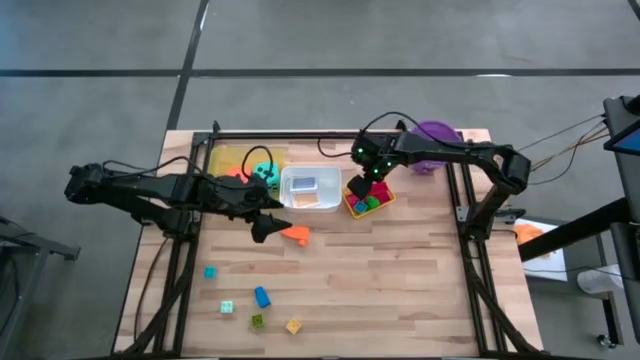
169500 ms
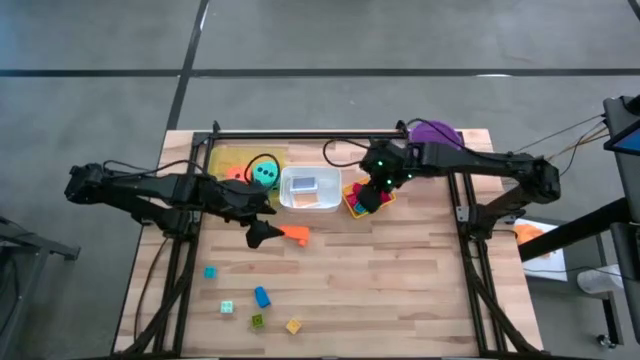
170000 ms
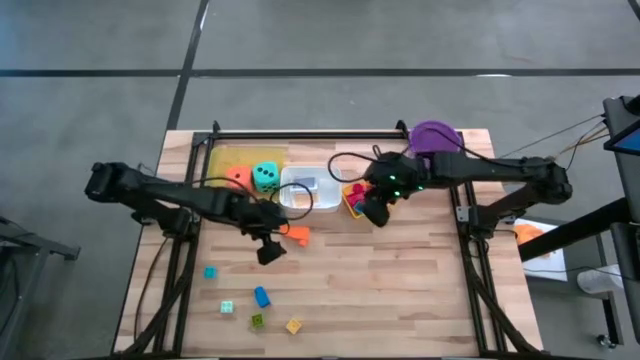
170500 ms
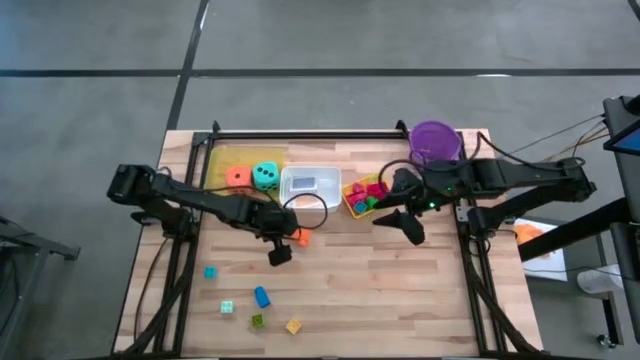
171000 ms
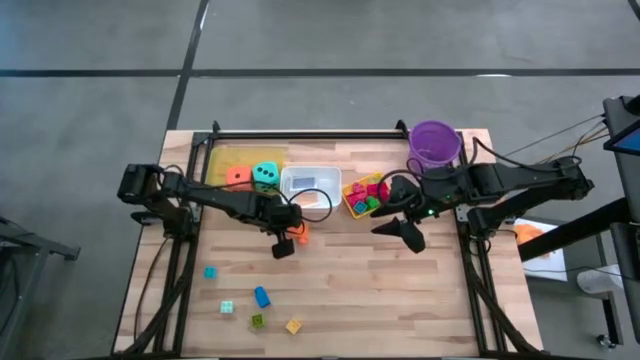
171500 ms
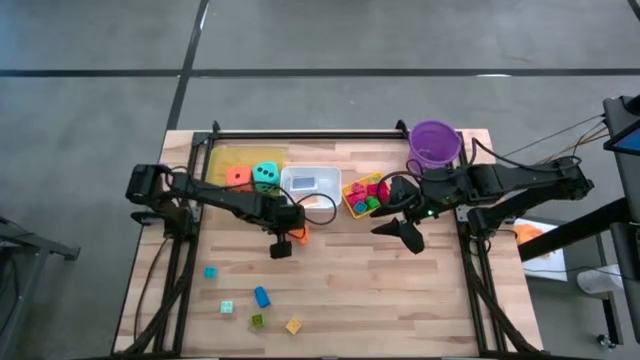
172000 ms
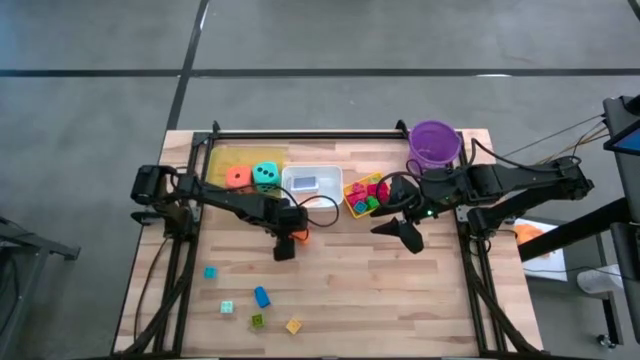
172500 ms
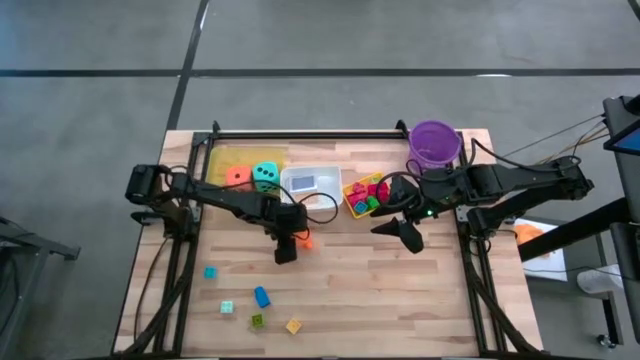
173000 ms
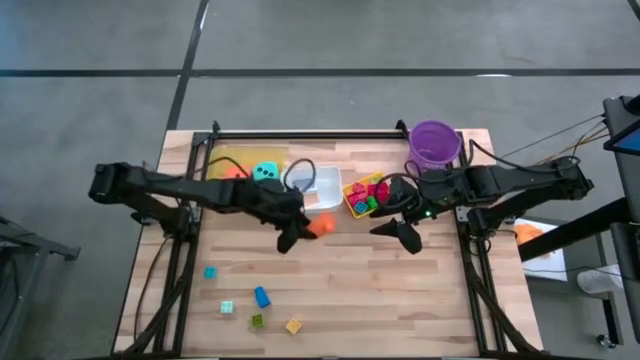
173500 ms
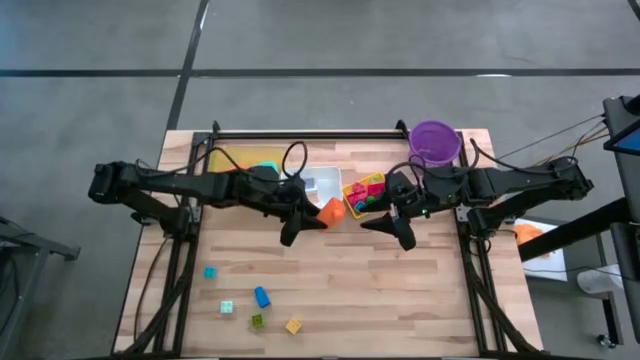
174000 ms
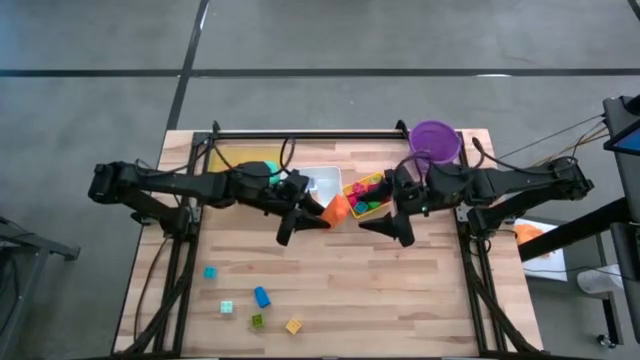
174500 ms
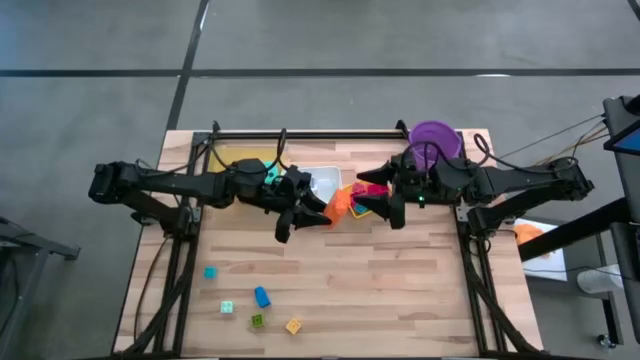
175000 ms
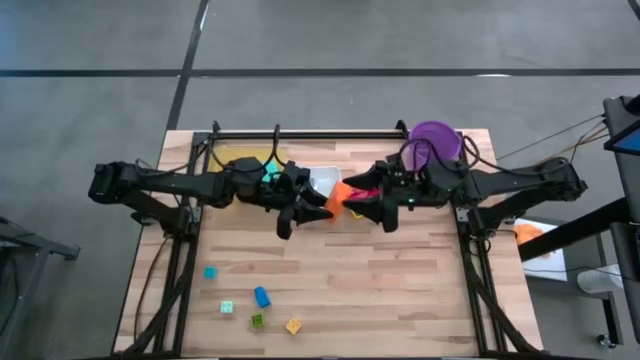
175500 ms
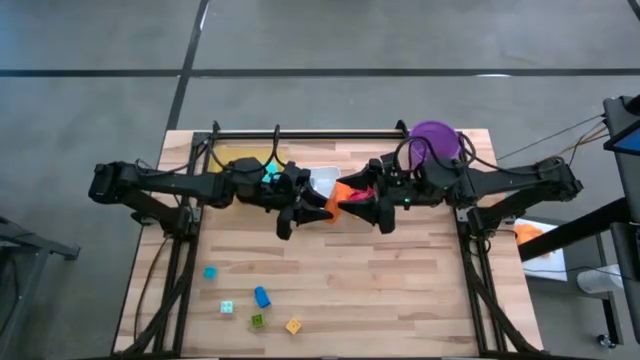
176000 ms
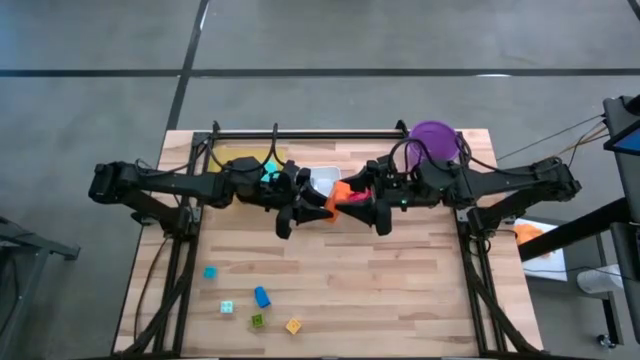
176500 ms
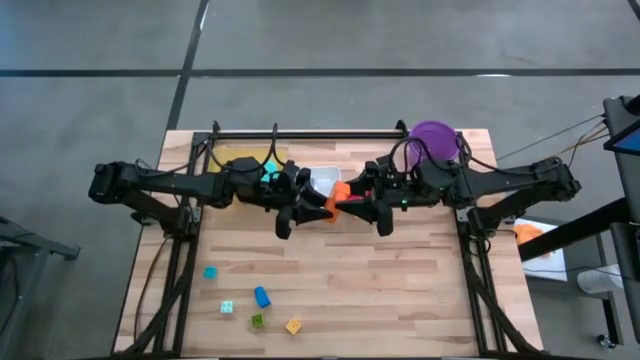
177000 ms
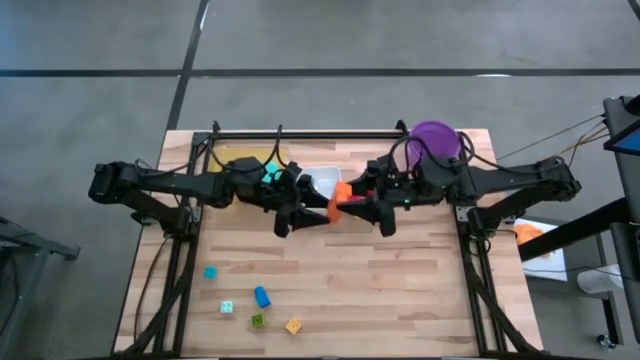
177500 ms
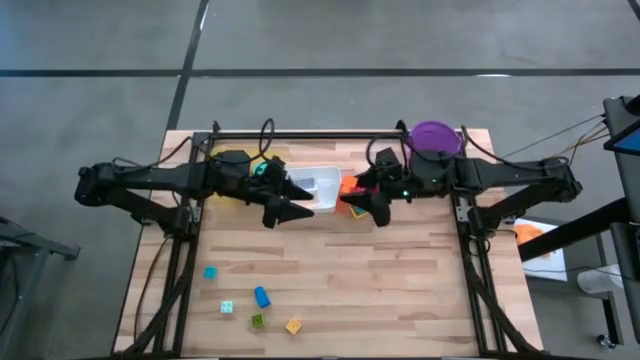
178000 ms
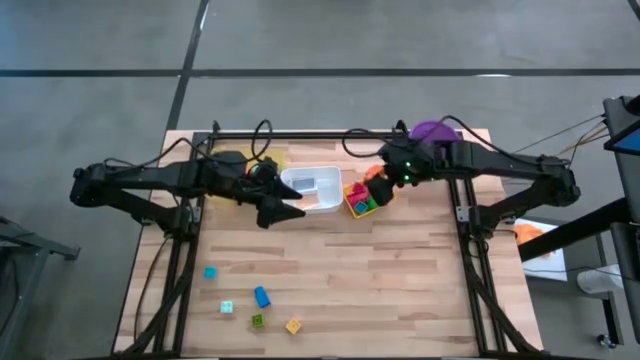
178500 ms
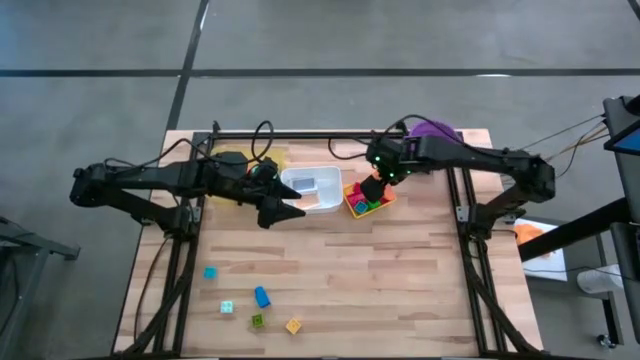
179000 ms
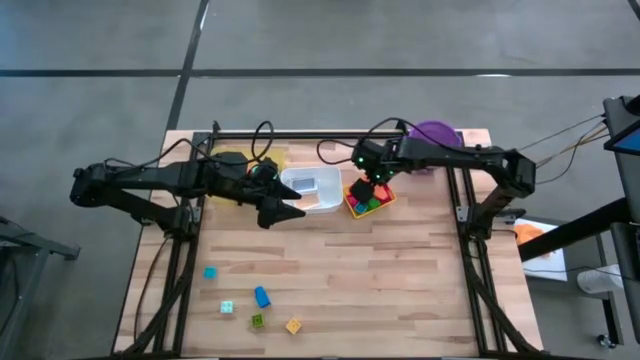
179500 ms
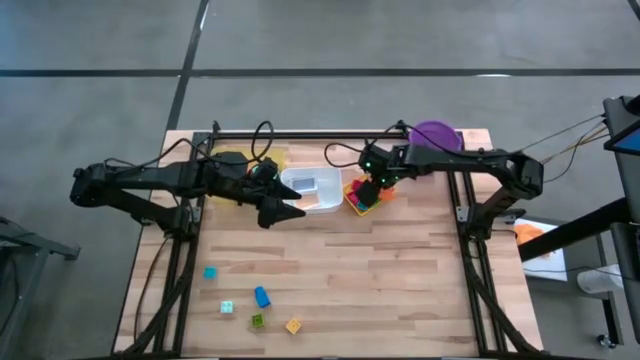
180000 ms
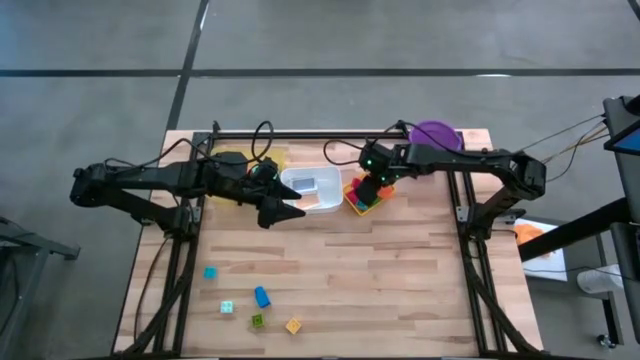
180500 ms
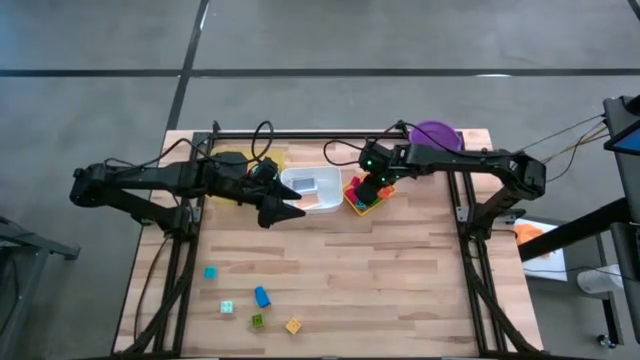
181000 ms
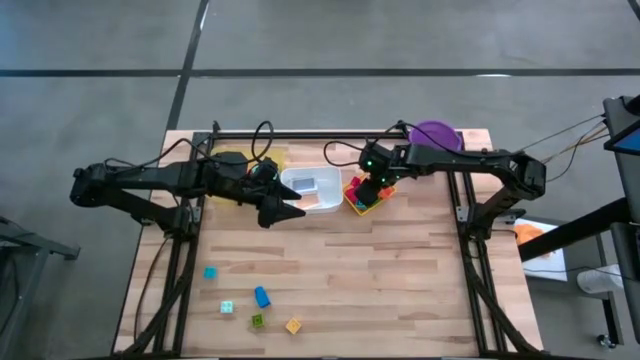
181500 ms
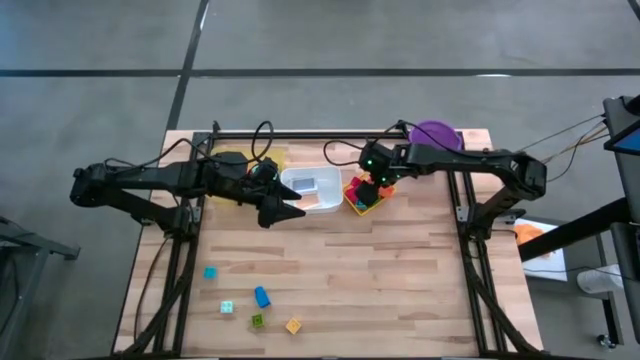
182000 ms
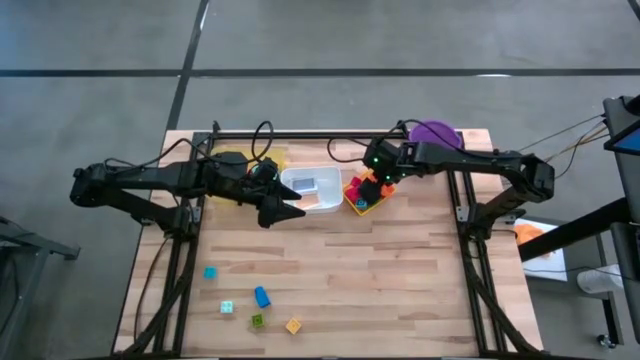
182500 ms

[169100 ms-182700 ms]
Task: Pick & Place Toys
Put the orange game piece into the yellow bin

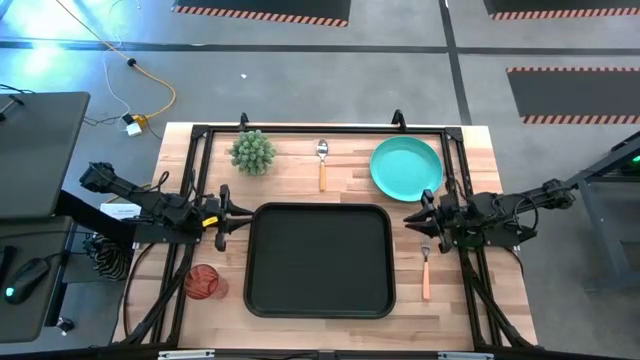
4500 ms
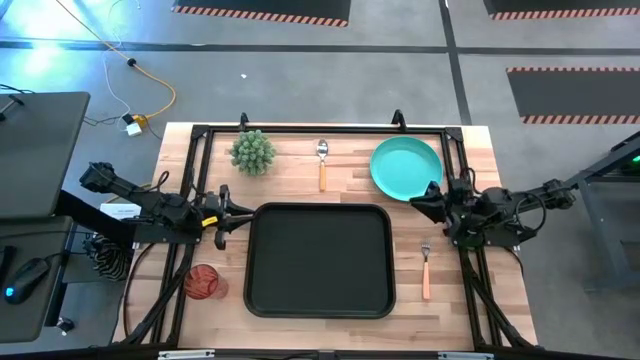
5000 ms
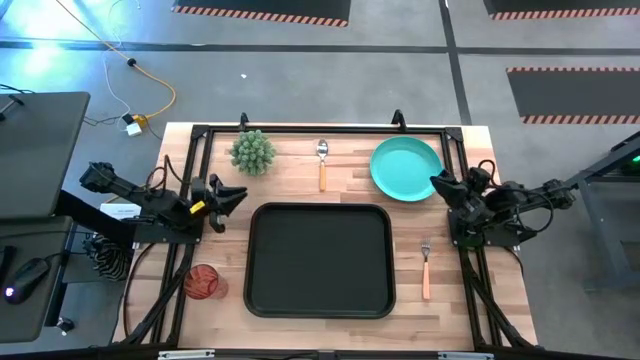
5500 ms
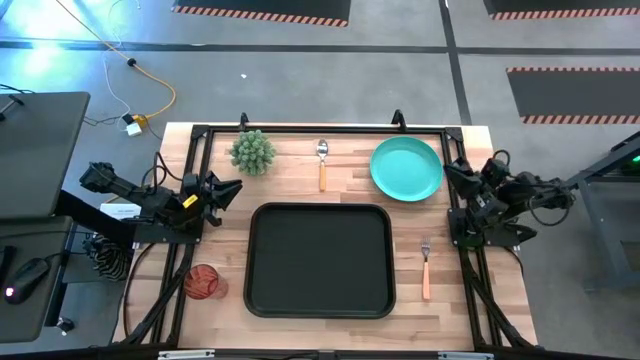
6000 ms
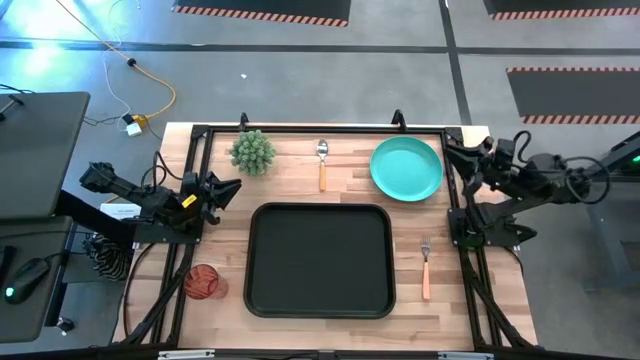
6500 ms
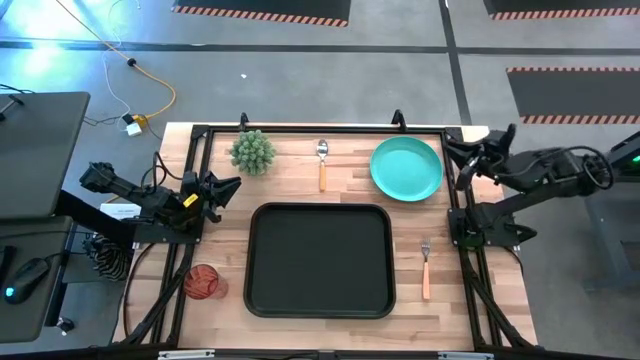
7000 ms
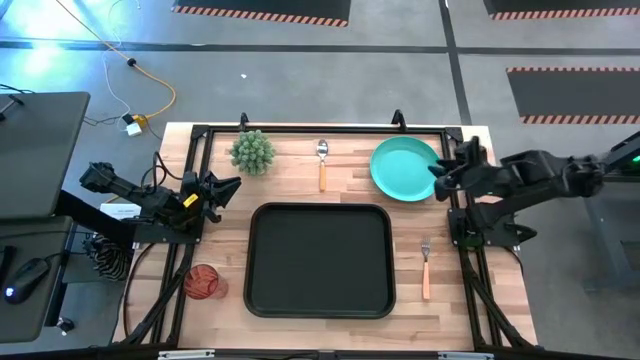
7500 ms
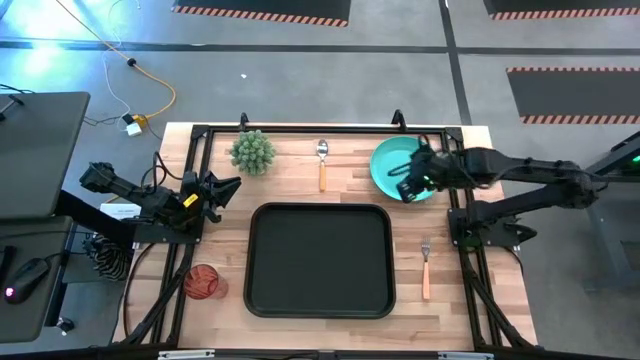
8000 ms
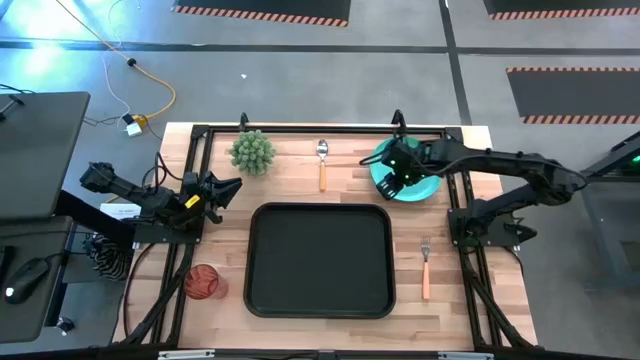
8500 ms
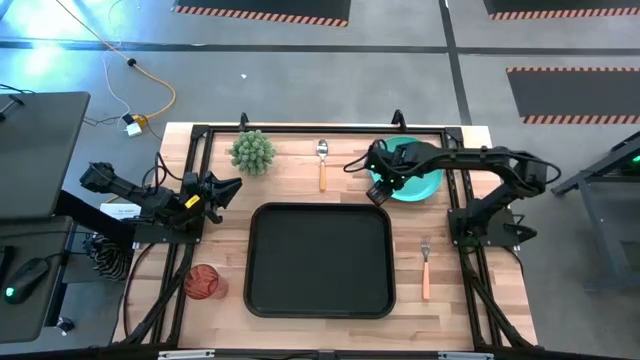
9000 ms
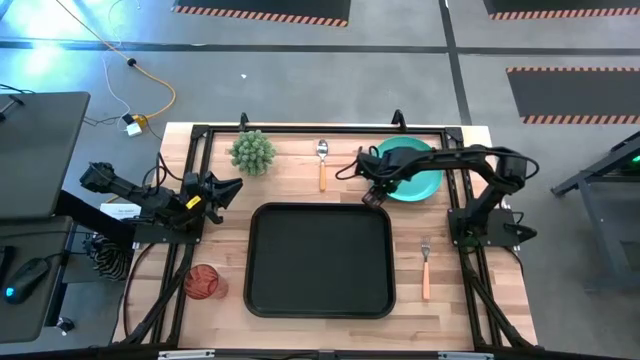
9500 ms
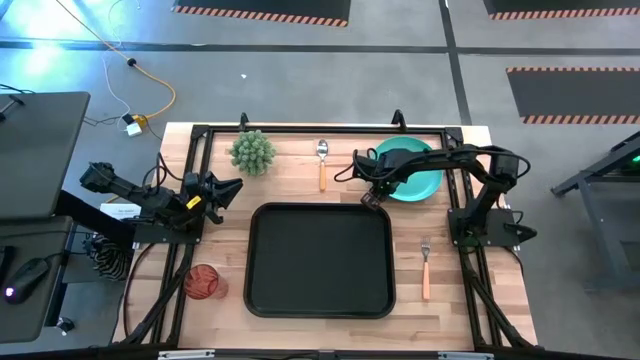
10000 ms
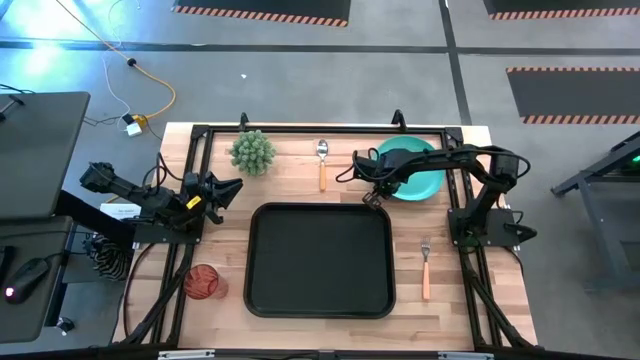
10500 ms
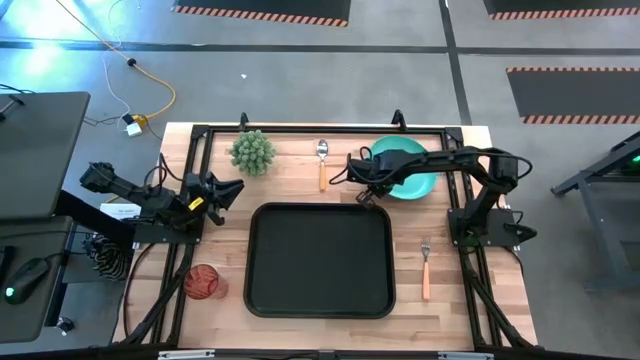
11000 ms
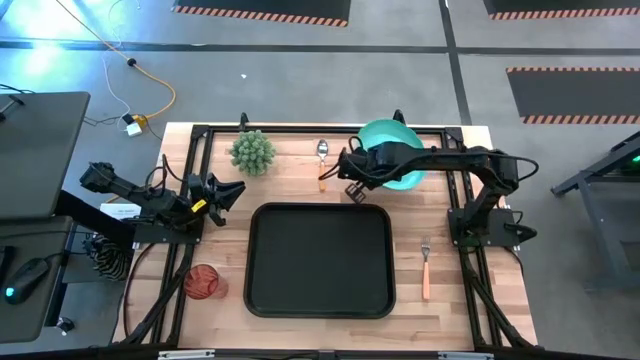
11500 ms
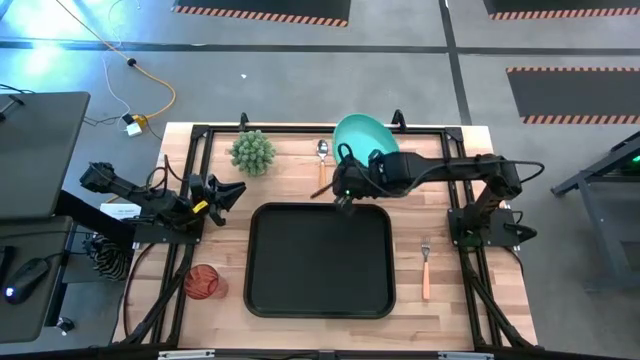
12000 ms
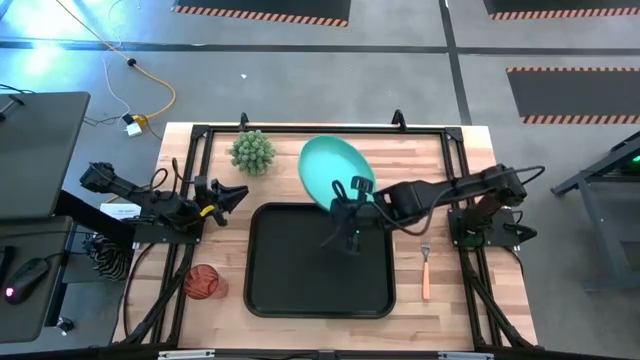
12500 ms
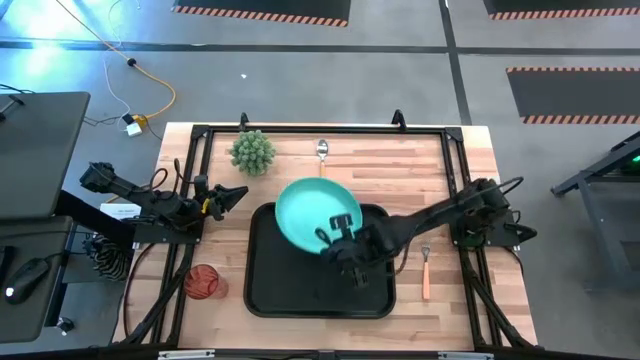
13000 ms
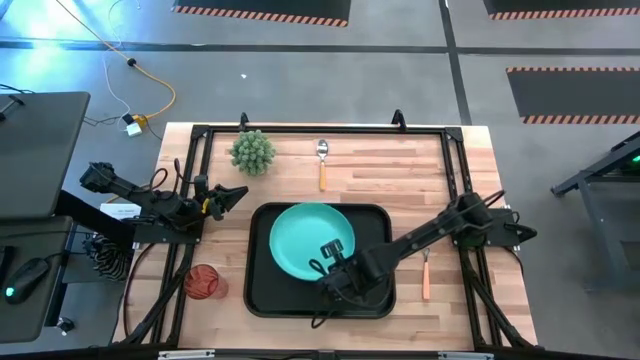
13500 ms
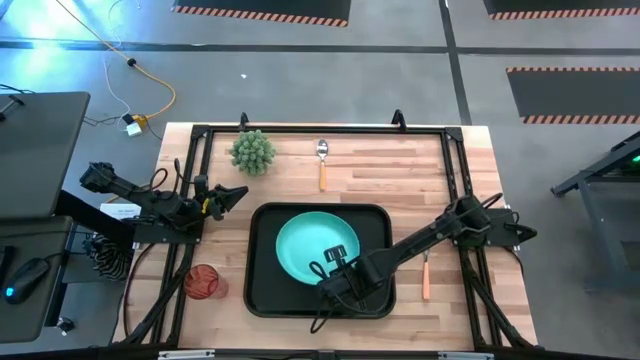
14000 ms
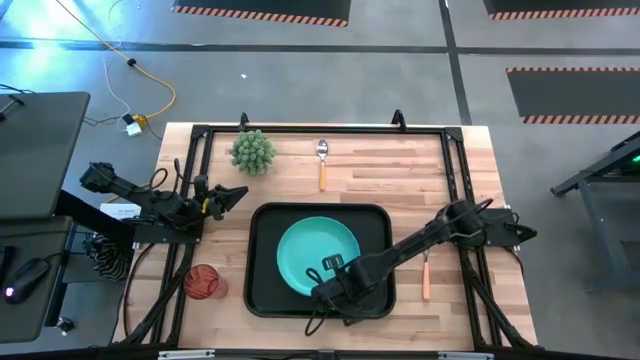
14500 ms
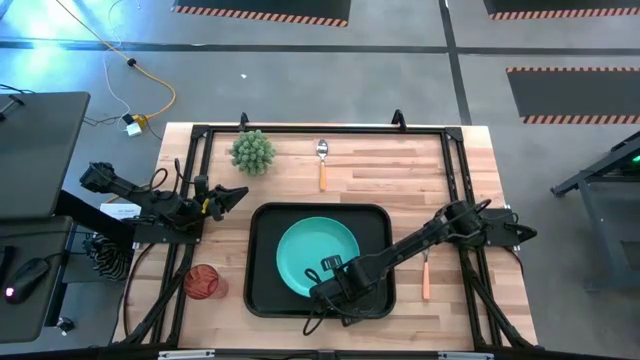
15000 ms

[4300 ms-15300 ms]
Task: Pick and place plate/cup/fork/spoon on tray
Put the blue plate on the black tray
